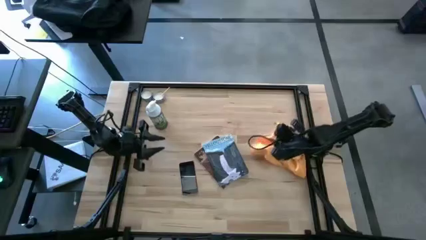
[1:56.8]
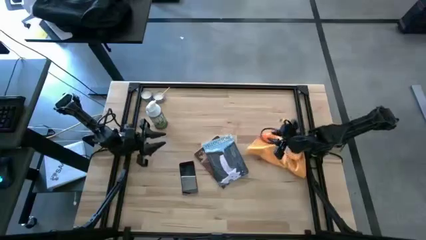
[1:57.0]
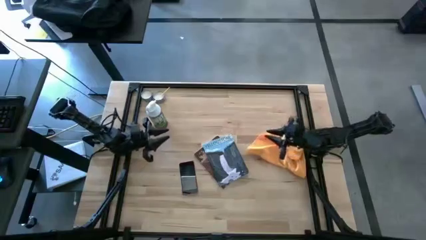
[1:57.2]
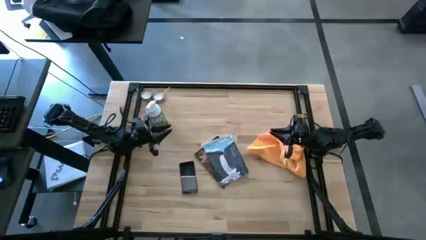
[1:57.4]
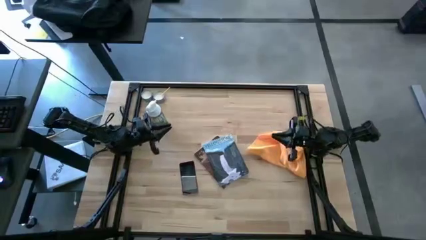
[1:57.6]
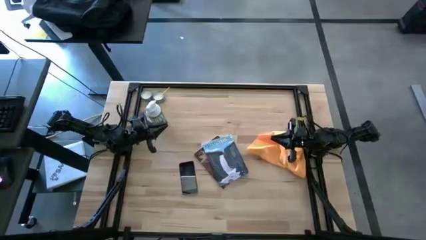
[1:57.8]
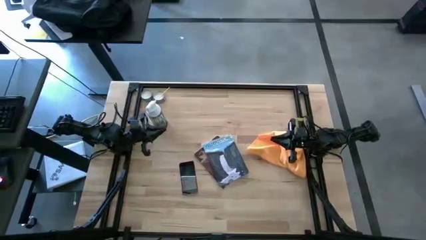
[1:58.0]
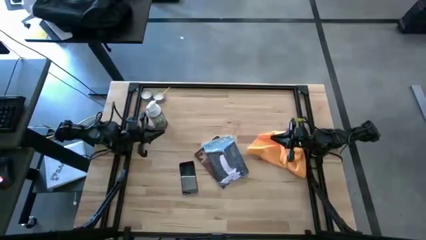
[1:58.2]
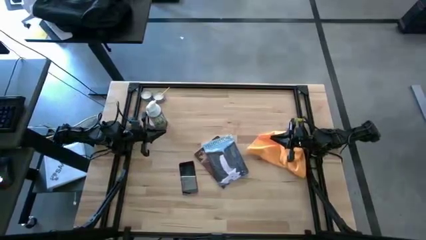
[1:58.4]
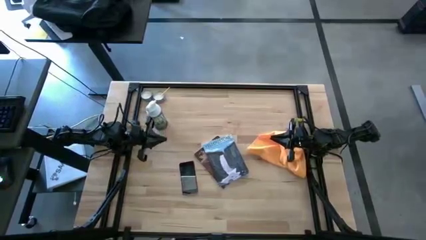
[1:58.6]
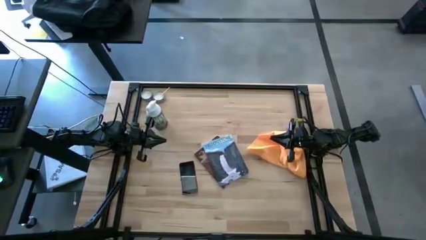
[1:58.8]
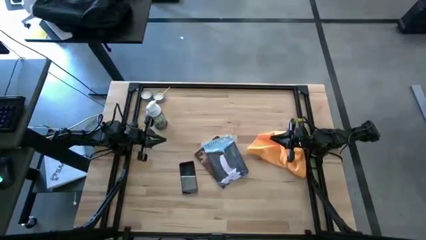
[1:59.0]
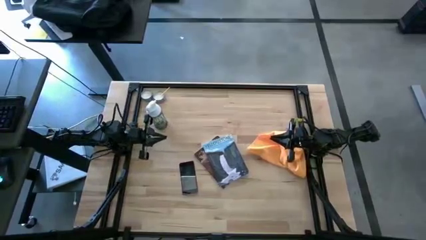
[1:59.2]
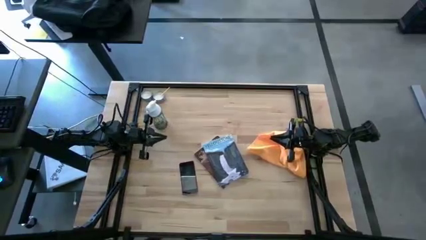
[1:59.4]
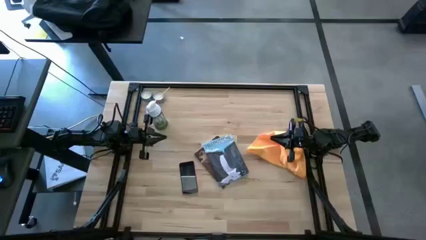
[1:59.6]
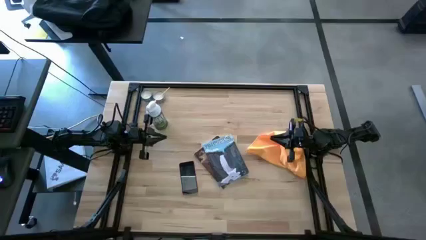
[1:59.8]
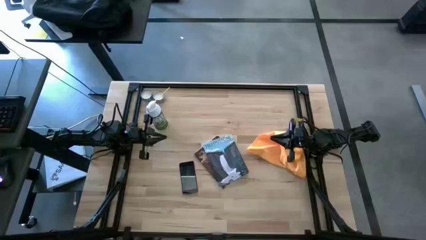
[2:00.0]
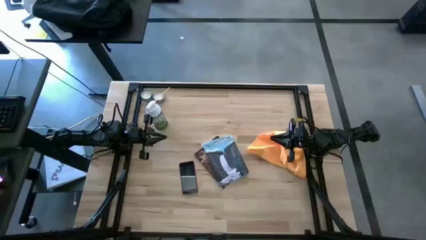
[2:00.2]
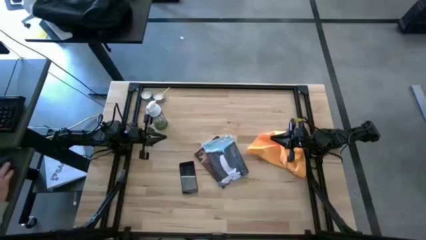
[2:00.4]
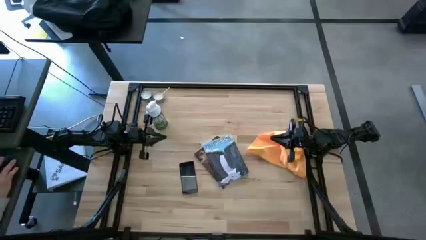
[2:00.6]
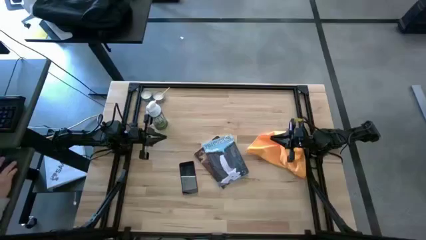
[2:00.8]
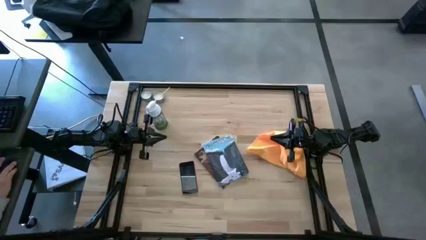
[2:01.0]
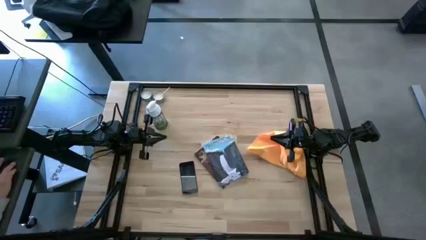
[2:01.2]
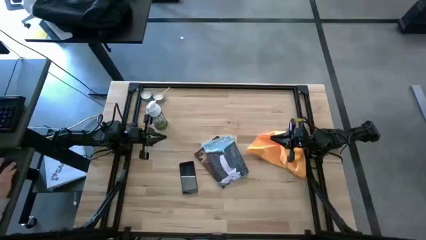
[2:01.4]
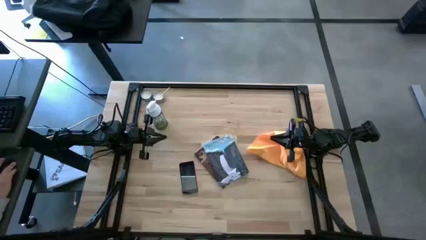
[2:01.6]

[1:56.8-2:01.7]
Task: Apply microfiber cloth
Return to Home Position

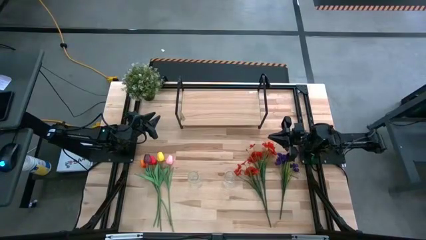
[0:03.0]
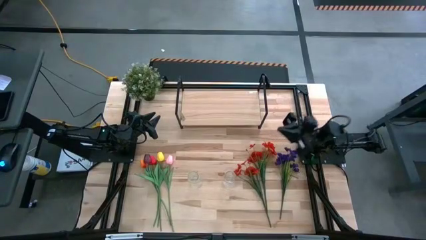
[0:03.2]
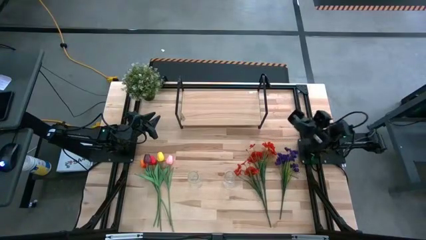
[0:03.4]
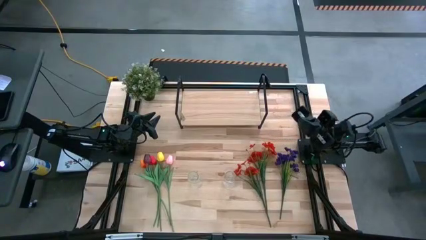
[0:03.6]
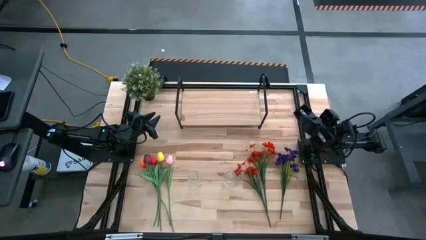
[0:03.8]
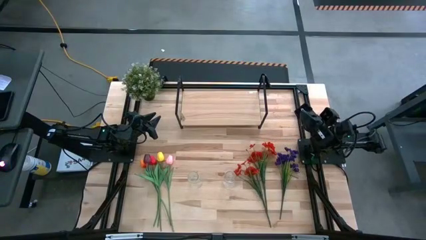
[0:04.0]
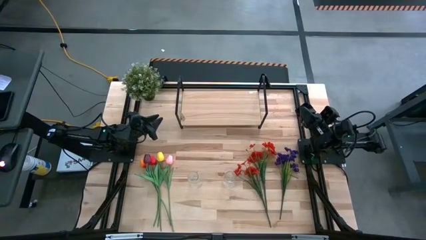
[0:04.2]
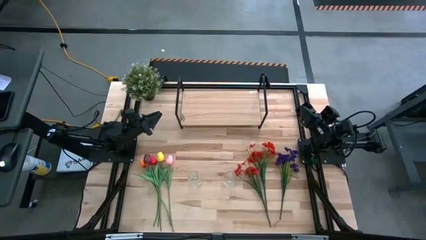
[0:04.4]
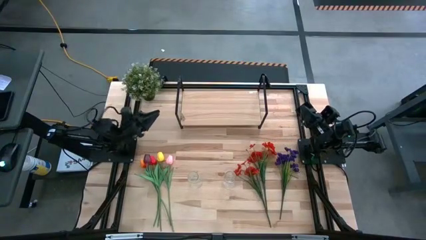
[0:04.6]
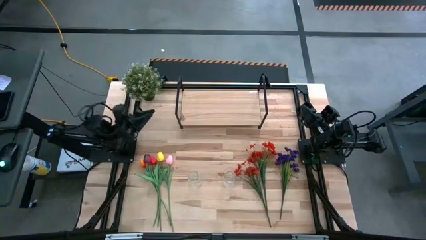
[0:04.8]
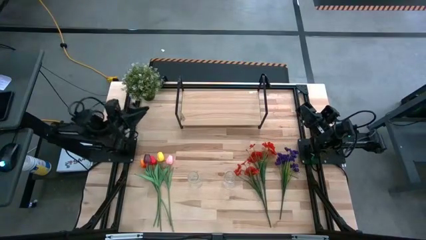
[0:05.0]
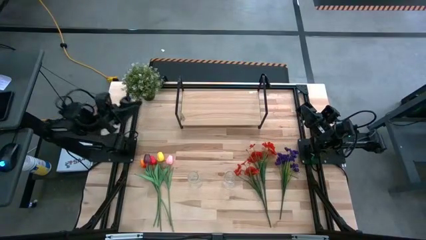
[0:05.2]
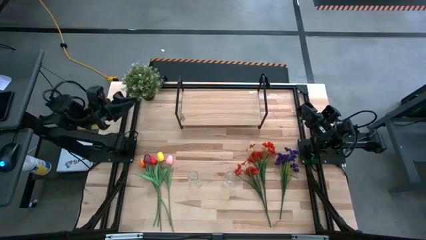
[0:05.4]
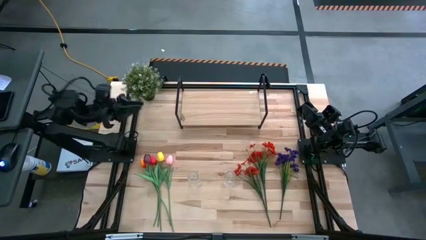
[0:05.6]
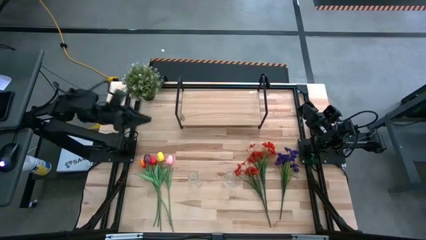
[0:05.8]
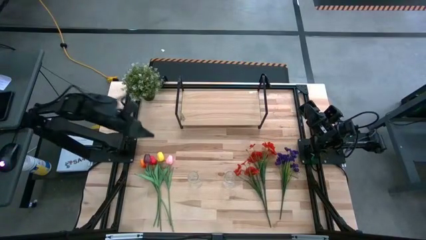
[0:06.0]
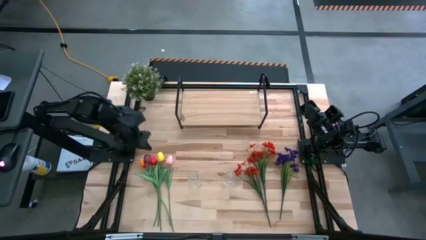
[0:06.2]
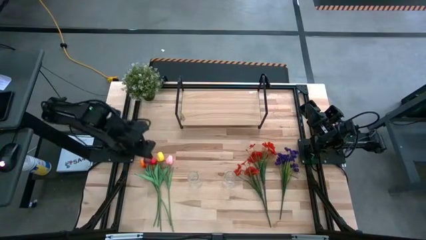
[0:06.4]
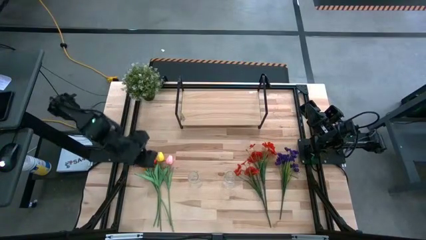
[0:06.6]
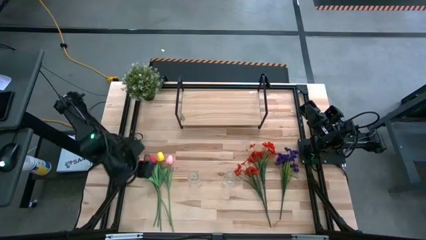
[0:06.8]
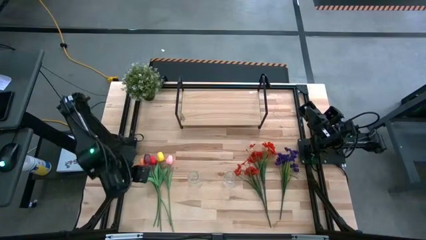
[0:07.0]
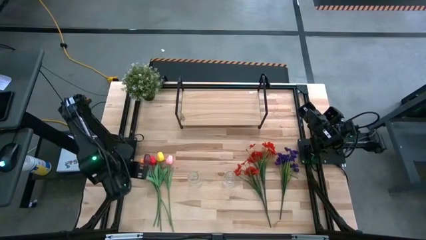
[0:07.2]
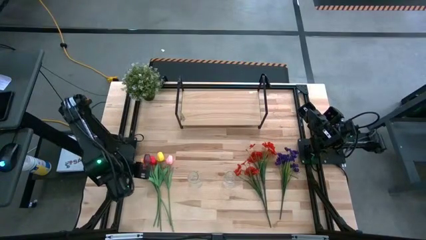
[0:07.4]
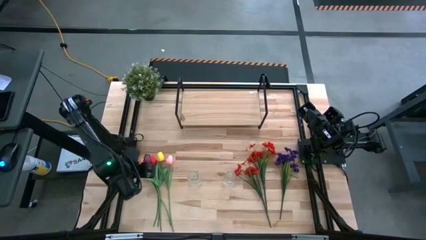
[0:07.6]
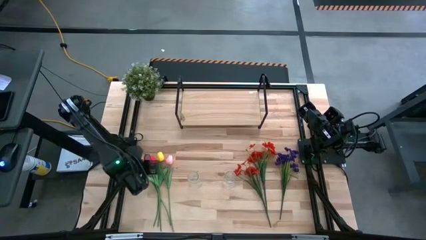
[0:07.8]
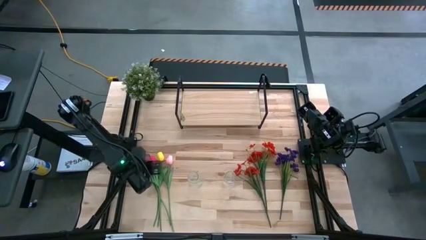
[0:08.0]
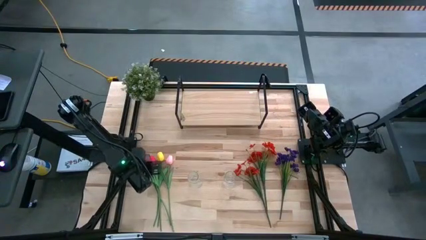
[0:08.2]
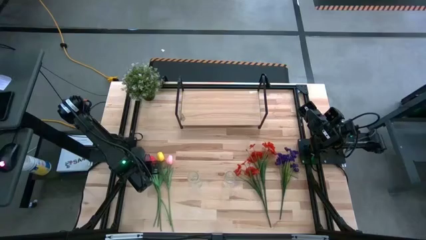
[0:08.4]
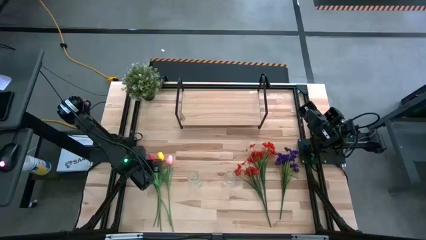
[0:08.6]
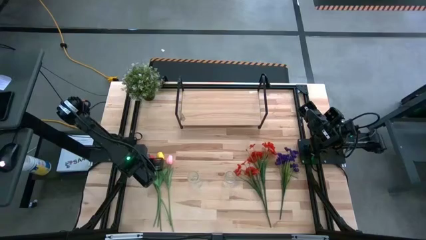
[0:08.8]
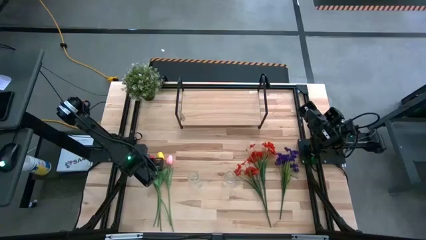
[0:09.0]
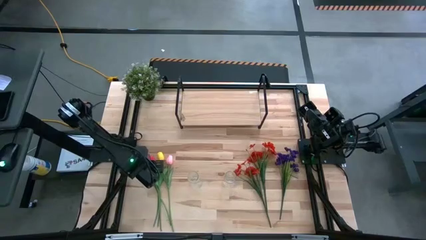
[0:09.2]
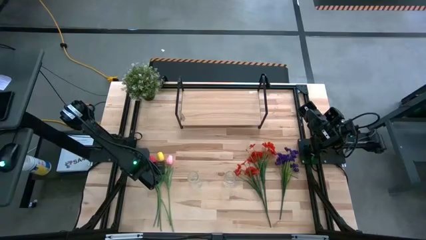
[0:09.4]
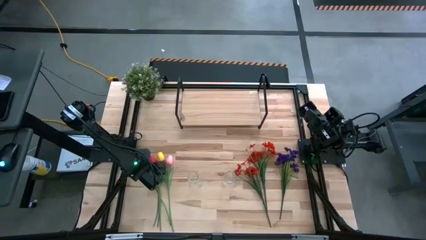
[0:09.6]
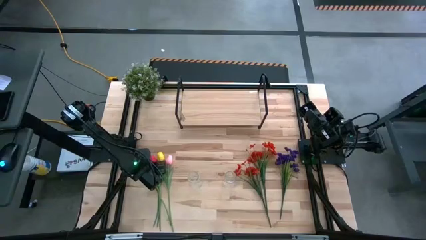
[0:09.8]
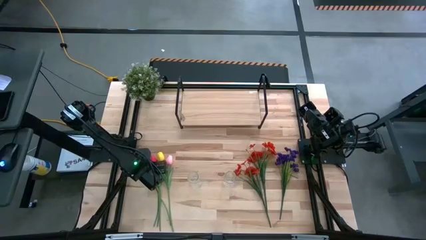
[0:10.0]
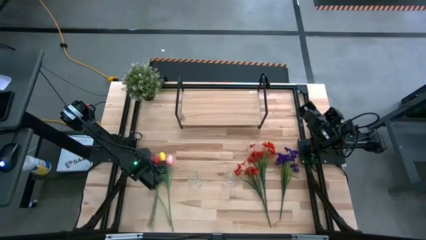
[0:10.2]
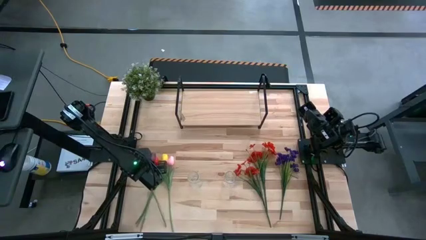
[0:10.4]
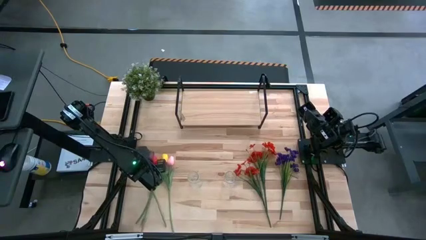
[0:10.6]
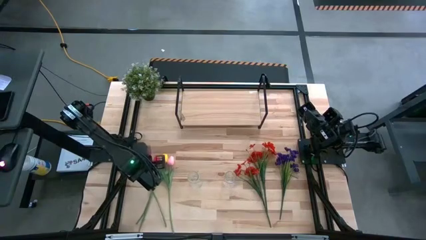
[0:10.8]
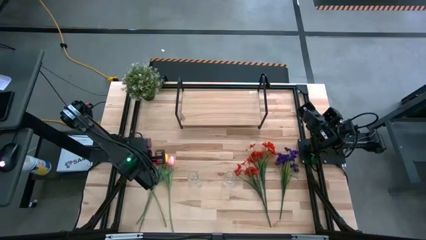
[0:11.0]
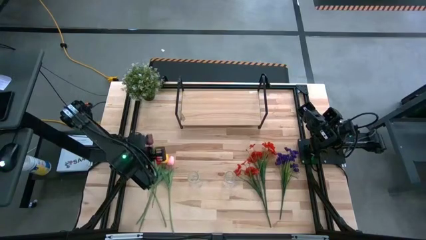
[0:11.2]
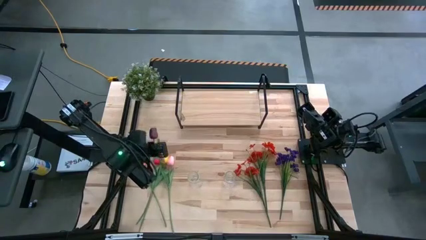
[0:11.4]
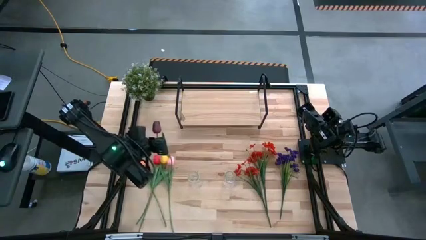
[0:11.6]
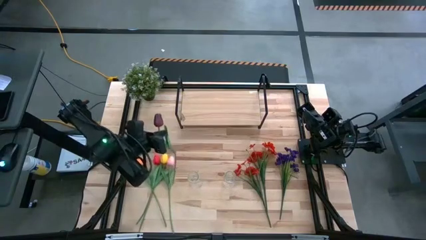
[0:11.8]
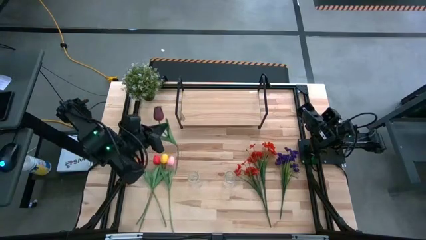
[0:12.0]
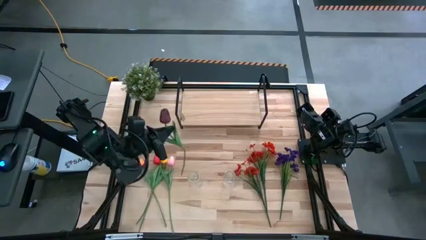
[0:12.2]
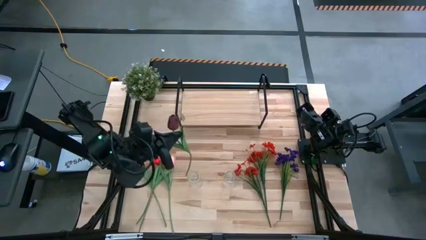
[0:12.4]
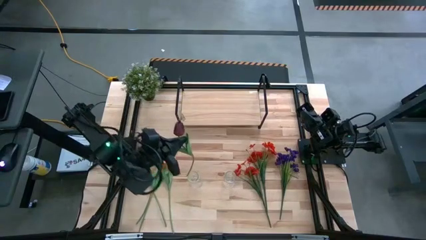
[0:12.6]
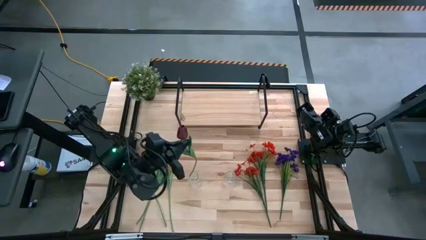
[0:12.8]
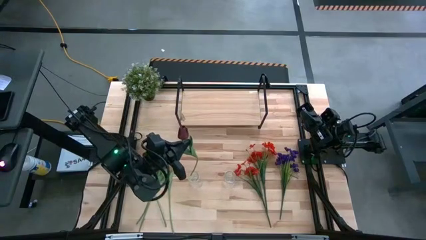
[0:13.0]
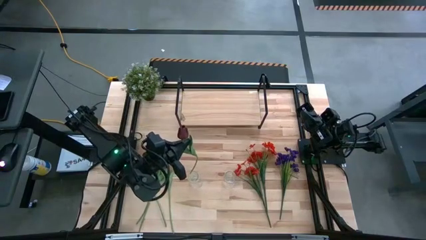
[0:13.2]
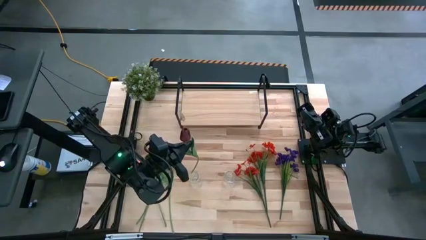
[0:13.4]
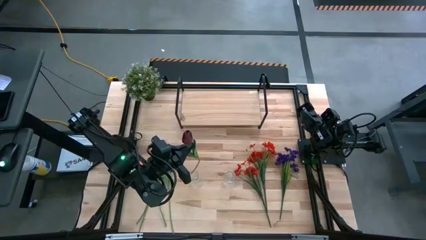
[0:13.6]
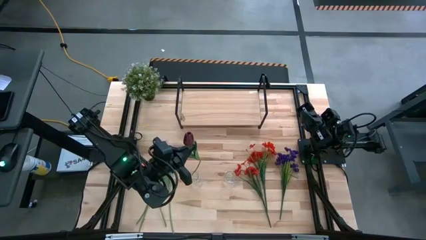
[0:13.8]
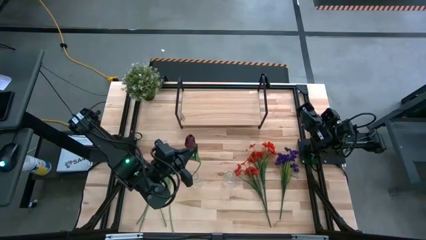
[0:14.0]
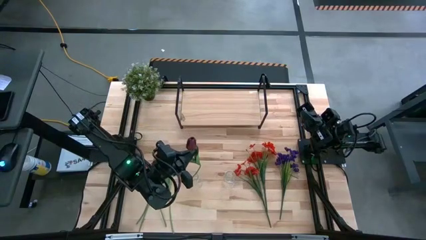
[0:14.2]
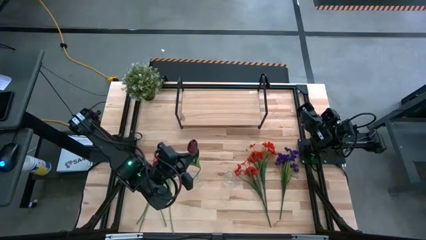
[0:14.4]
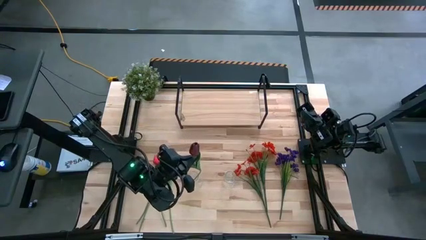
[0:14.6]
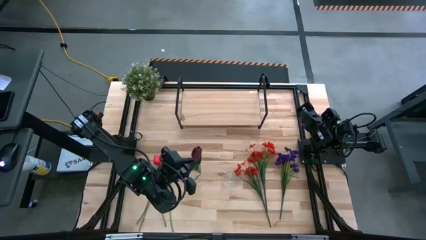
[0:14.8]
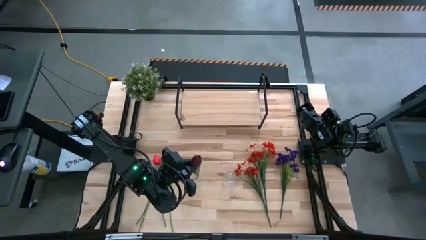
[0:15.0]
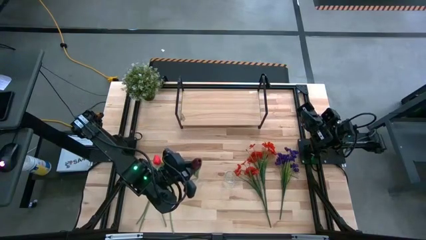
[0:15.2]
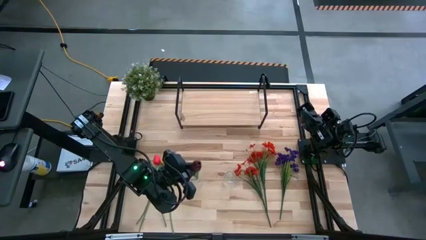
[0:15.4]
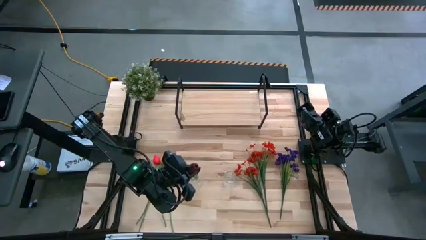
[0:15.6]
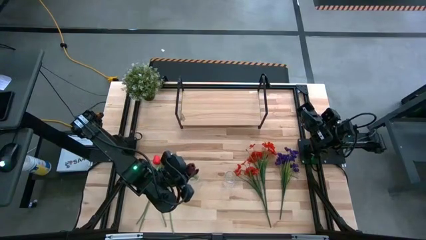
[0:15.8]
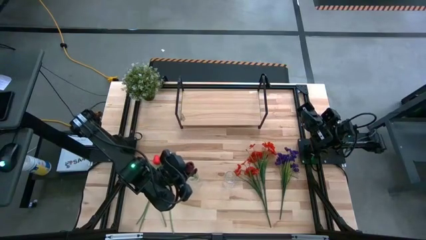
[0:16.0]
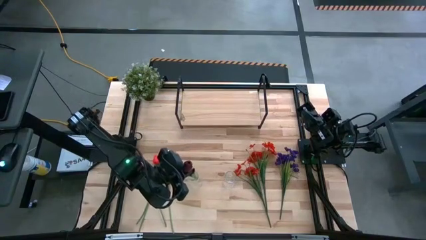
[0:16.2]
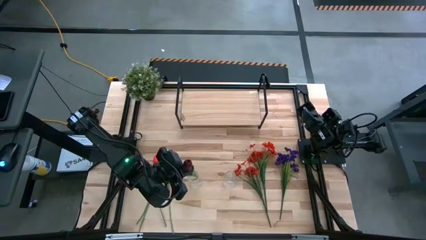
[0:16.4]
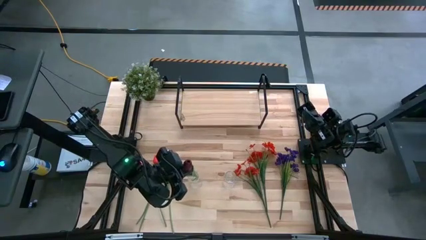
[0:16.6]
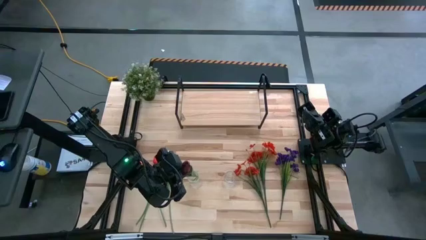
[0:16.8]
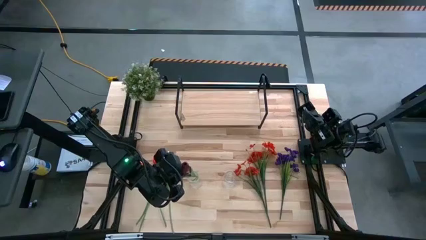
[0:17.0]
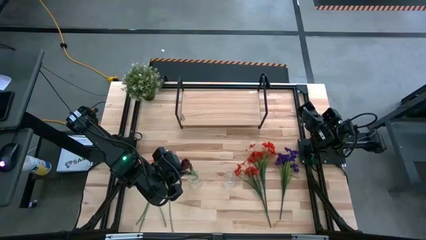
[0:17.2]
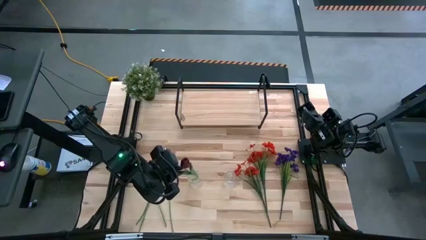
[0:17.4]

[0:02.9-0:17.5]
Task: Pick and place flowers into a vace then onto a shelf
Put the dark red flower into the left transparent vase
